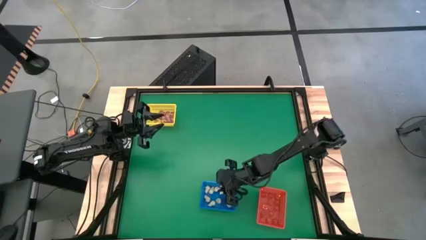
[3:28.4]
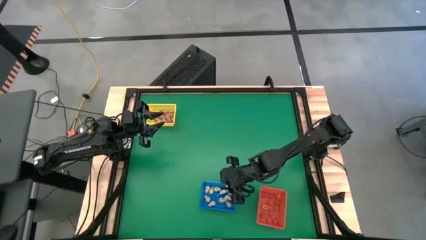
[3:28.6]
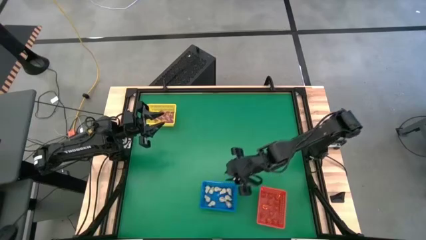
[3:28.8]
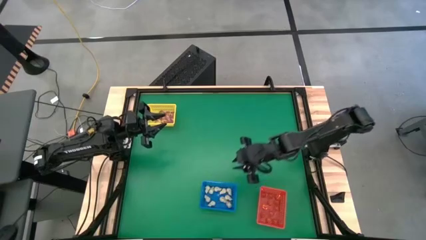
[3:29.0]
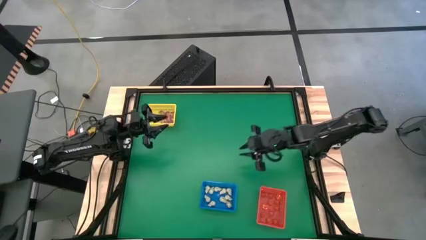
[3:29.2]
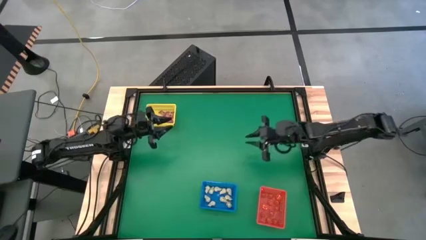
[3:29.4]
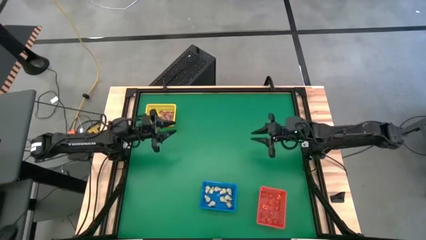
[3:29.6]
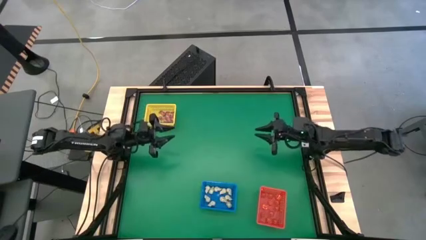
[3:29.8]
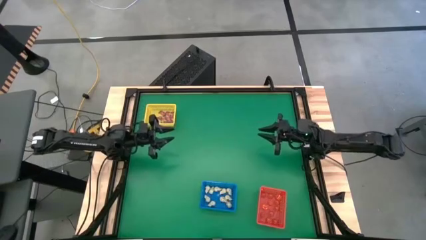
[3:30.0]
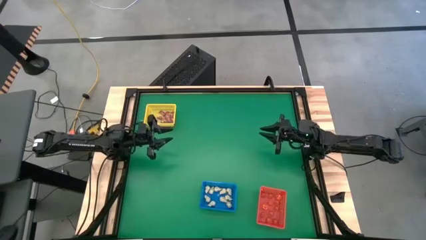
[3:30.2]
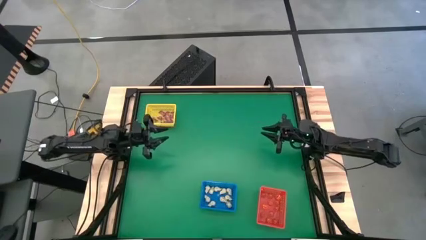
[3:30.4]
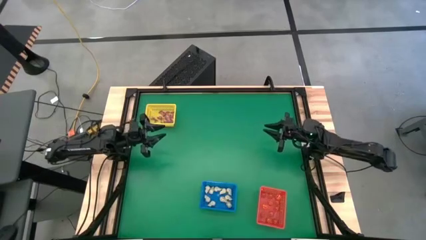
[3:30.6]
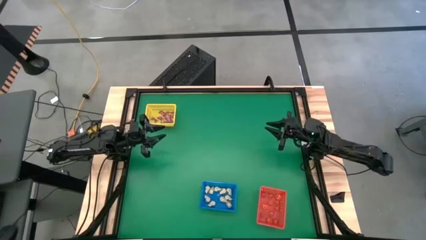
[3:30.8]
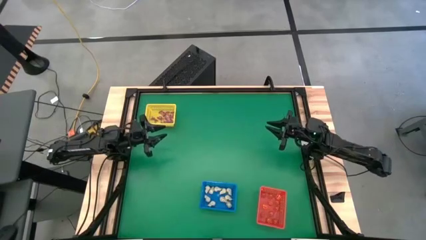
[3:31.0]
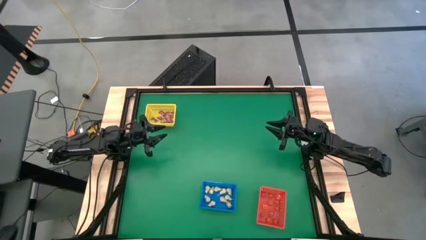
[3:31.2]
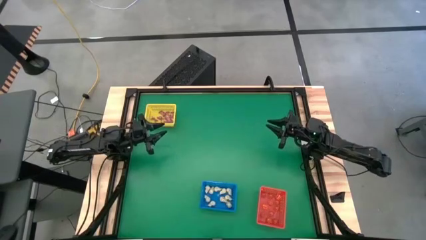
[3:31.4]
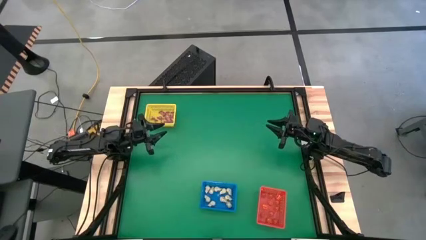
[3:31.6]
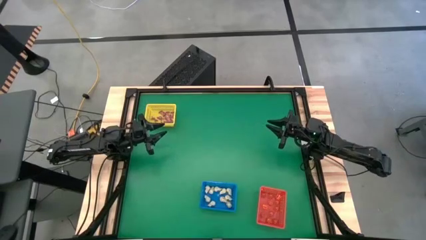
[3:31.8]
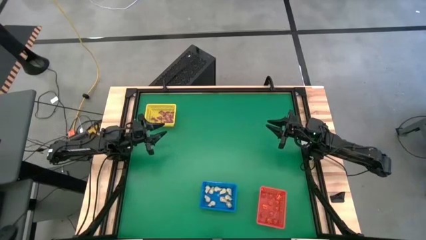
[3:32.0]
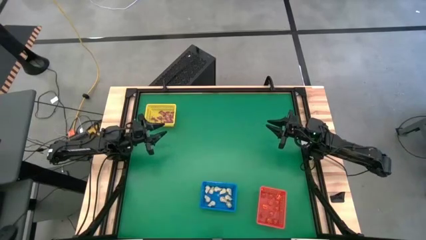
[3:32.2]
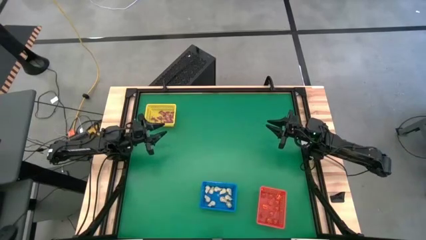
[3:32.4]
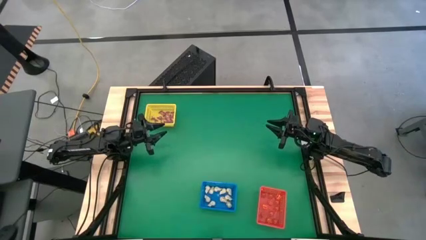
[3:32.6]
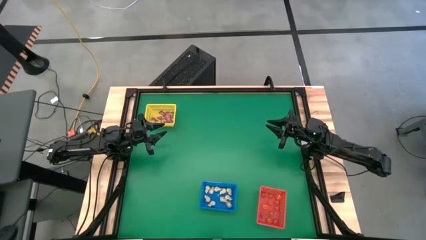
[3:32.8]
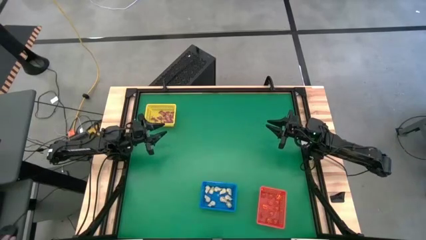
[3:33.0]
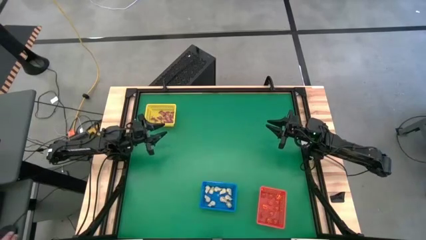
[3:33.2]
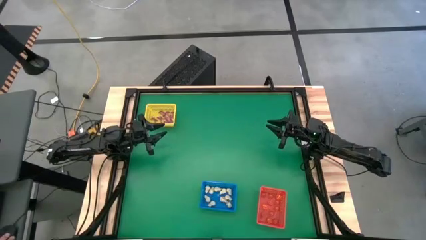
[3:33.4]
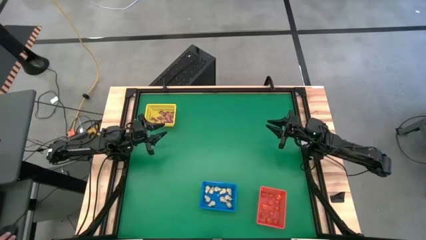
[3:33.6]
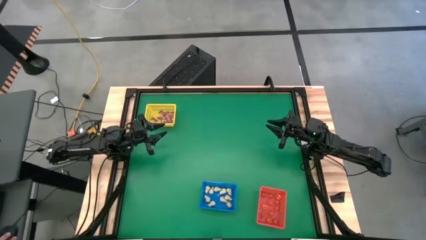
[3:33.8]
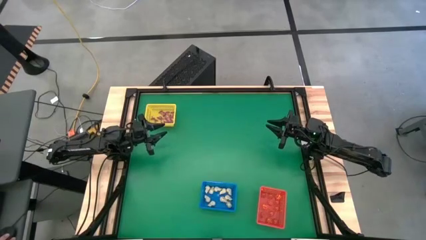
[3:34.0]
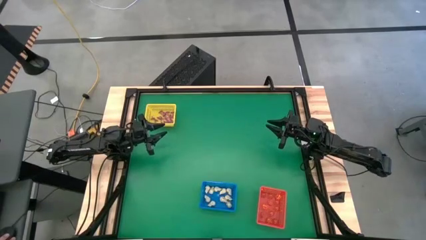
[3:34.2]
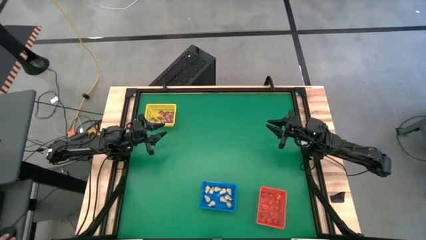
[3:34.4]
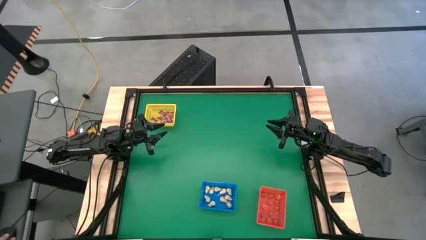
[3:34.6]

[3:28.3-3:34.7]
Task: Sort Halloween decoration
Return to Home Position

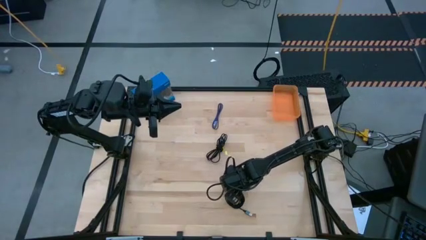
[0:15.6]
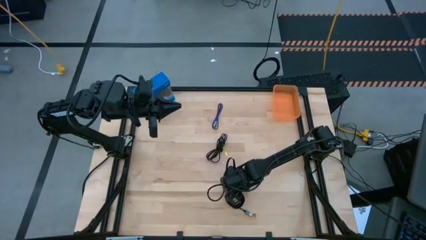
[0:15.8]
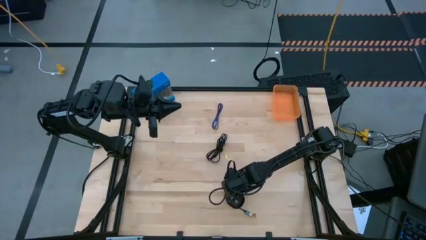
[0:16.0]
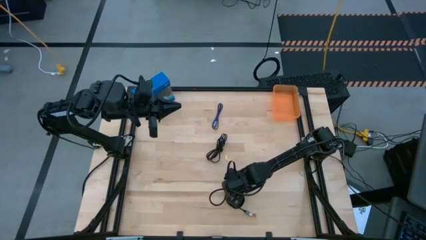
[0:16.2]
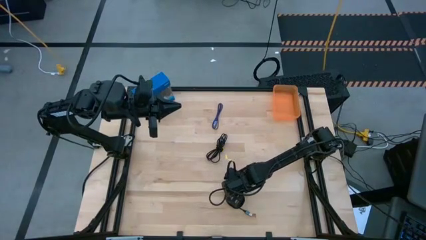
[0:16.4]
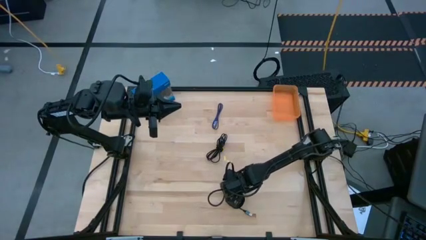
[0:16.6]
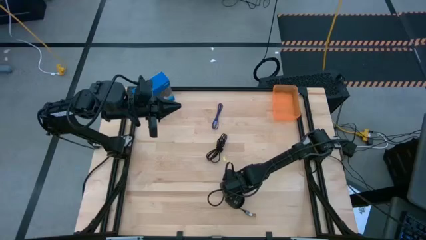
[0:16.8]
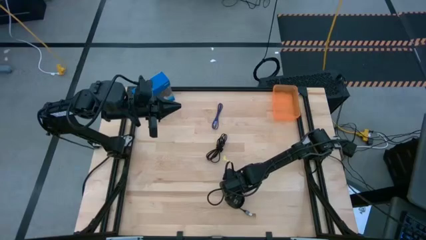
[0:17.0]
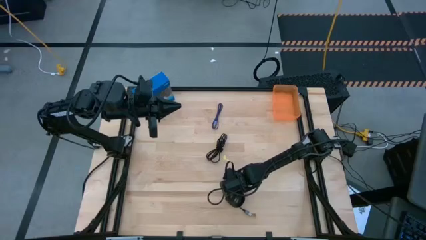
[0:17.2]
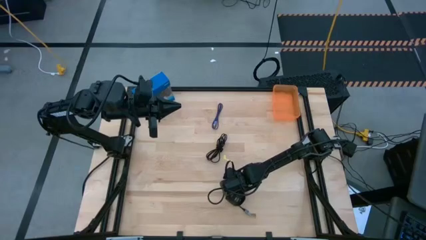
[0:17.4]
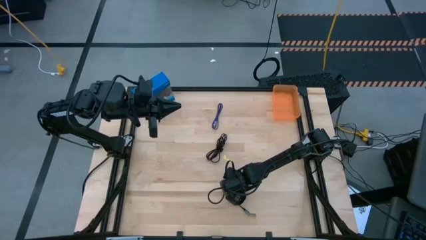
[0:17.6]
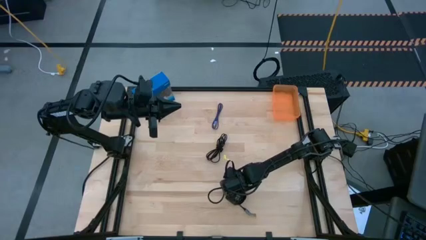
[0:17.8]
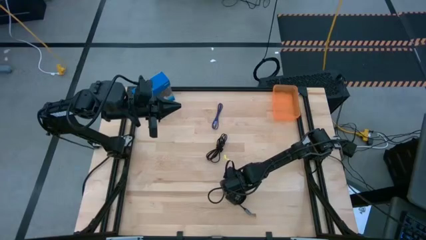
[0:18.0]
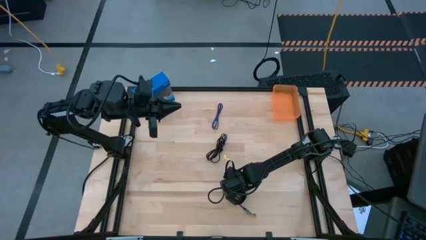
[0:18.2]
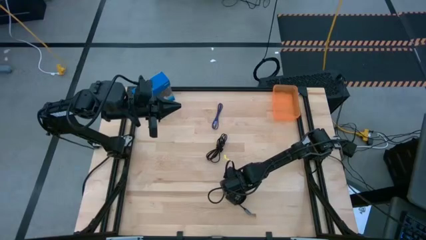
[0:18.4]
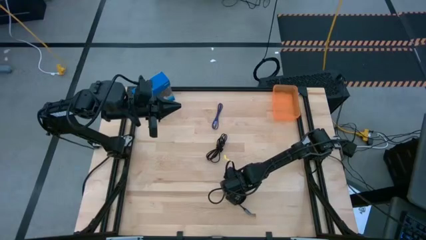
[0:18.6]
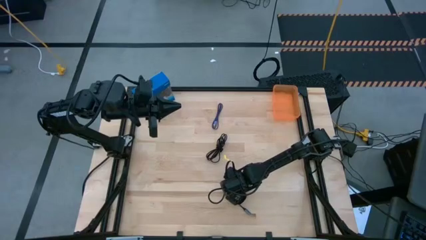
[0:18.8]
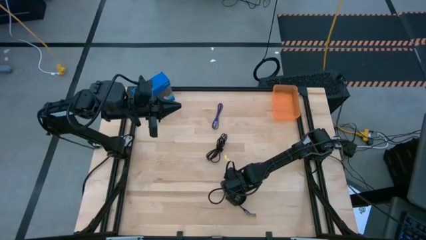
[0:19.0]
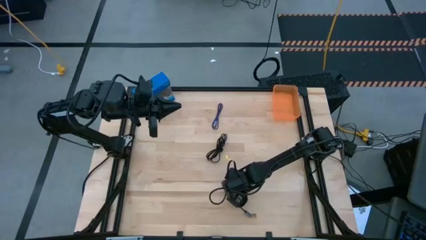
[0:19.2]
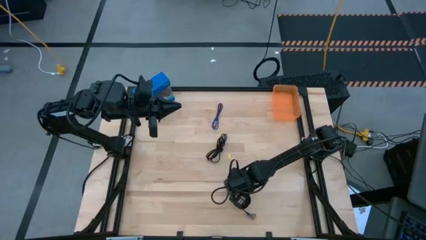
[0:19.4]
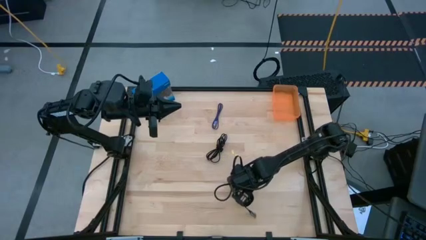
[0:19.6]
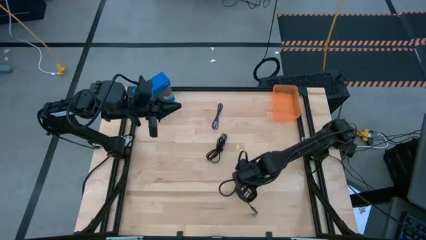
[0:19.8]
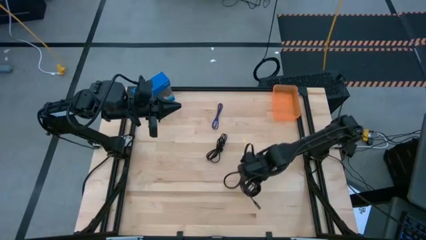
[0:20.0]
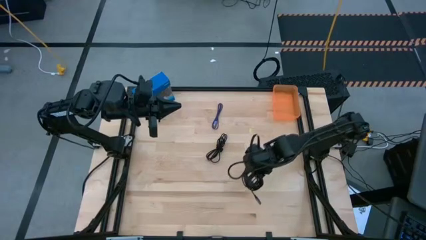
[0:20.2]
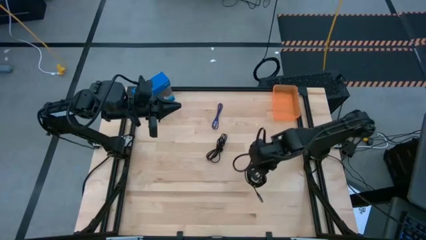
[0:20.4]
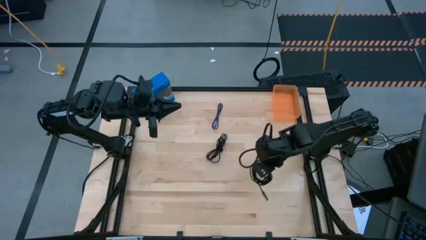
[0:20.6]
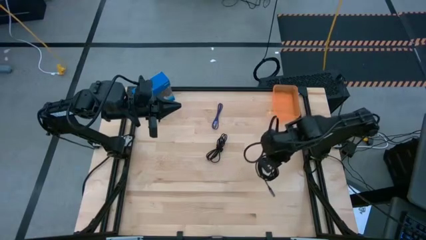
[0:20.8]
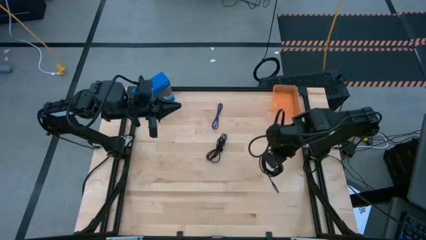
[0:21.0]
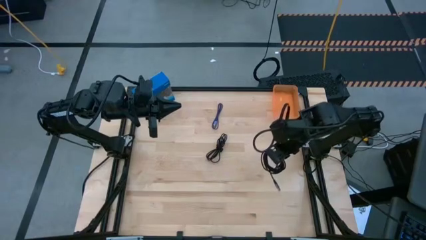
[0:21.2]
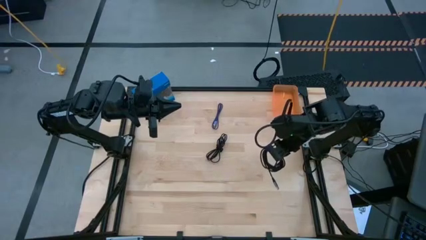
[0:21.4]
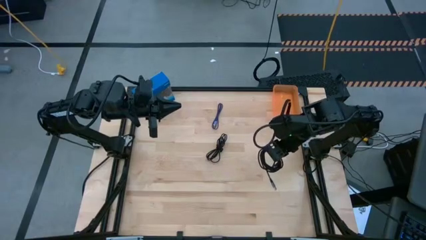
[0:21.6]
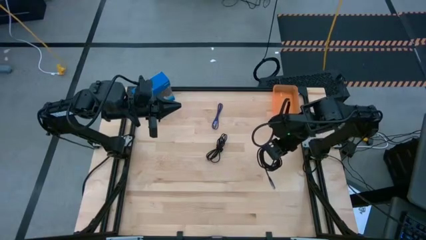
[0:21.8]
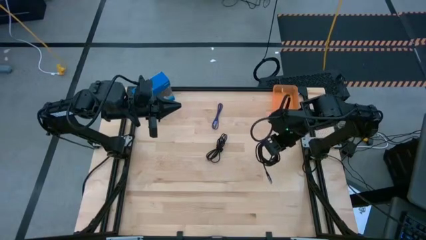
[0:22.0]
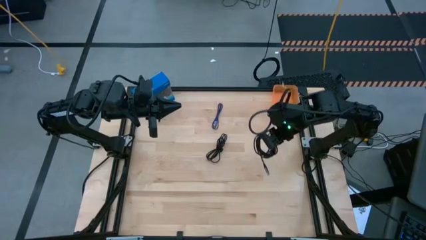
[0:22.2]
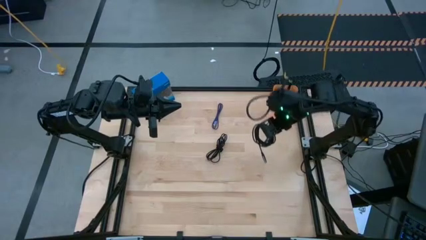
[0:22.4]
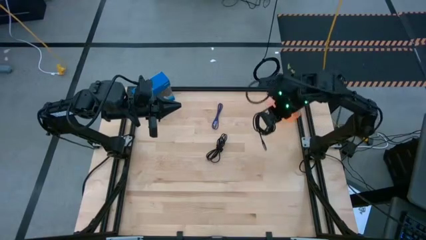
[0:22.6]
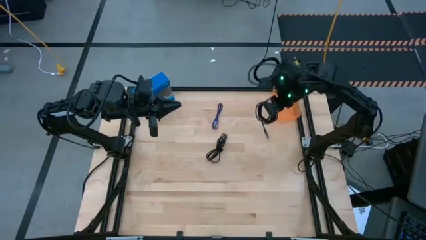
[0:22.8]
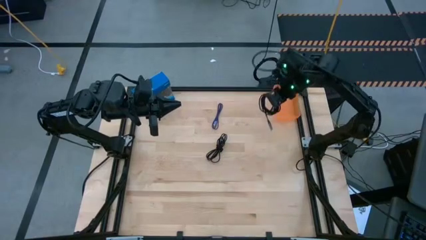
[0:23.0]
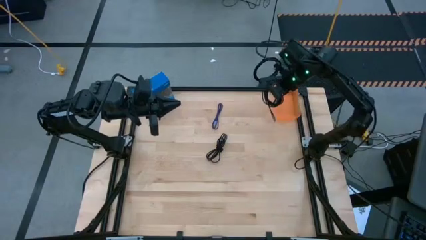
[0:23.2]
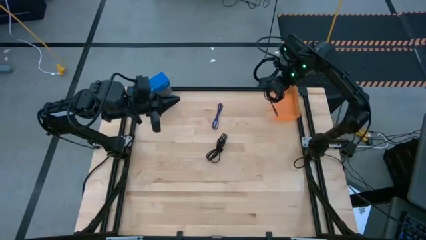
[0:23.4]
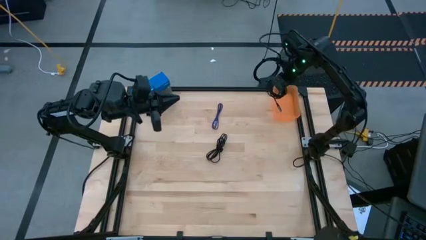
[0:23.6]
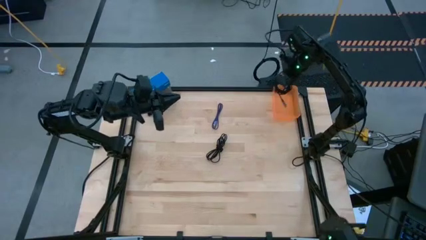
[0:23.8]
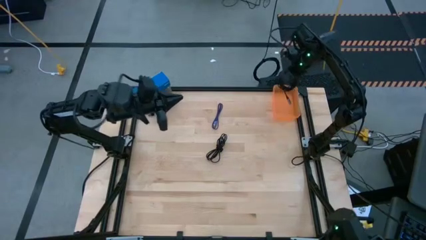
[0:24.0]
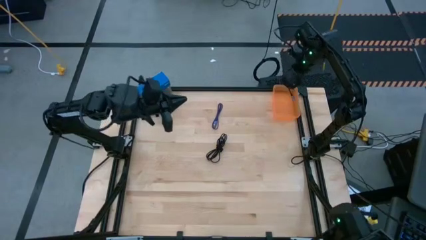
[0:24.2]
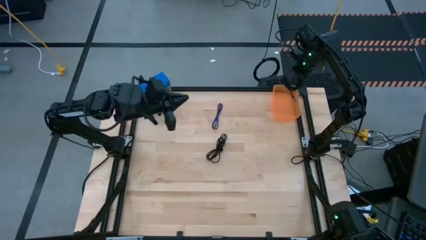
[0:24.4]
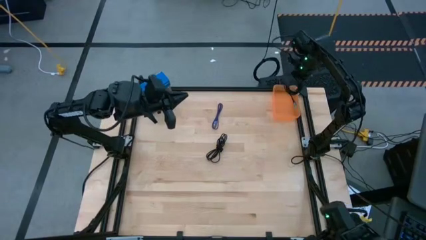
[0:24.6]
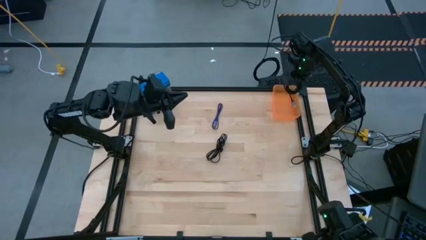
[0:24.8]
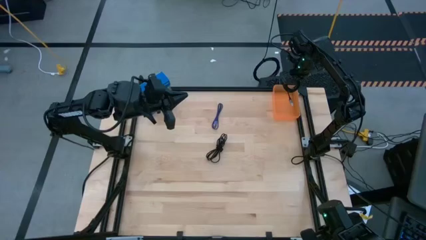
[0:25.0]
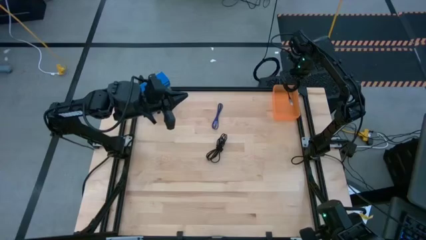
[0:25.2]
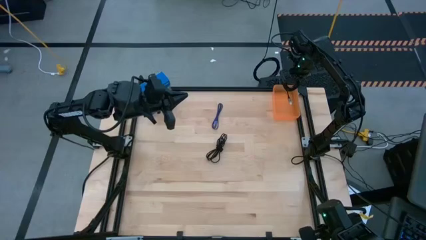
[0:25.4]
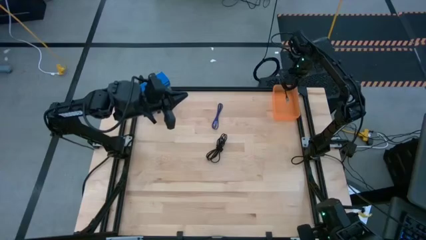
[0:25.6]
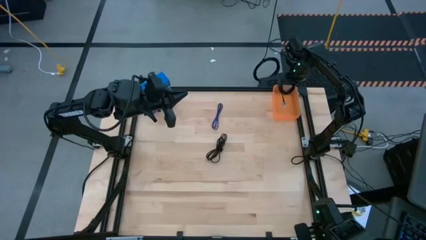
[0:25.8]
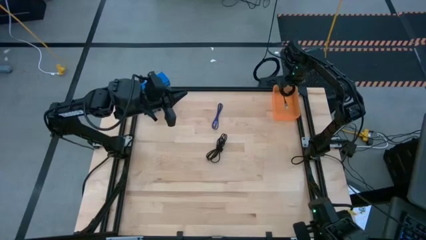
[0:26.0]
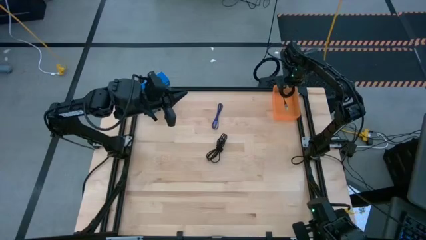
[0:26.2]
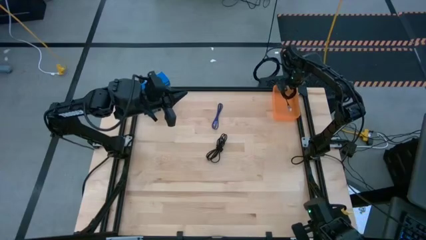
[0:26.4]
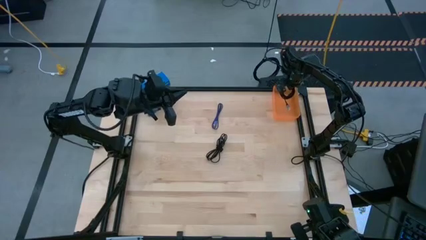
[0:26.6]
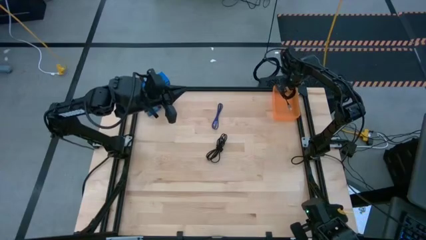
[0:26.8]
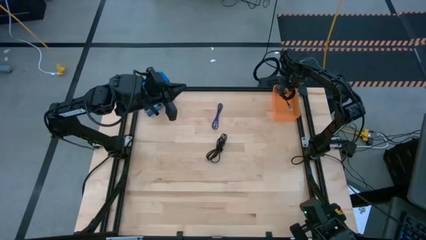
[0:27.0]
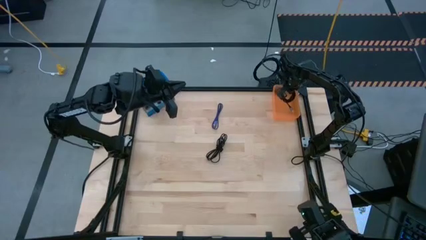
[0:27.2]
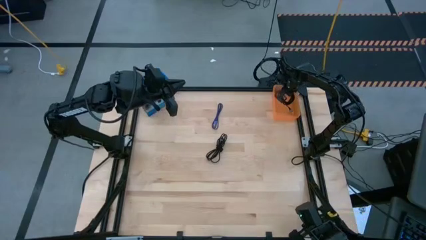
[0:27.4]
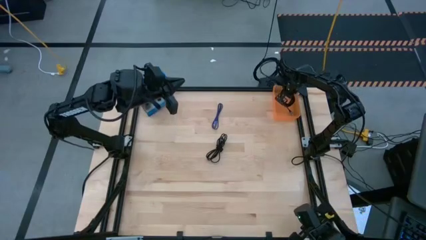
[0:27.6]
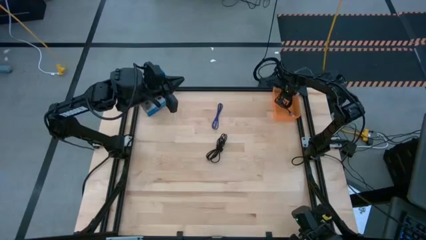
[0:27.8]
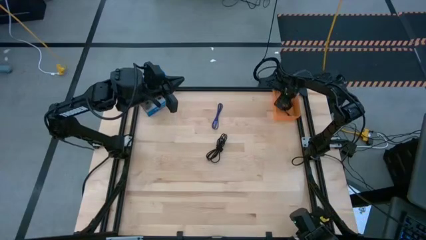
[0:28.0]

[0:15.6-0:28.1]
Task: Pick and place USB-C Cables
Put the bottom black charger cable into the orange bin
